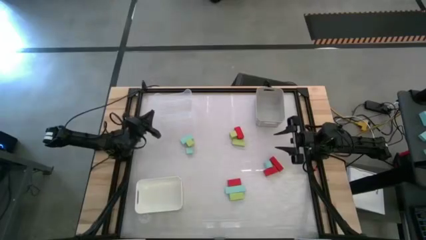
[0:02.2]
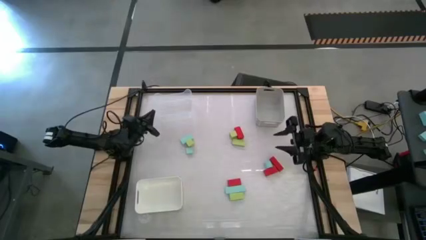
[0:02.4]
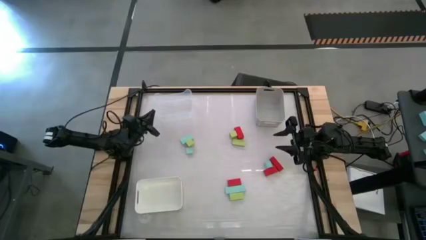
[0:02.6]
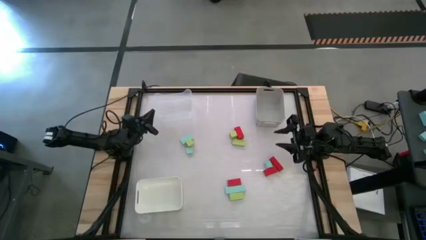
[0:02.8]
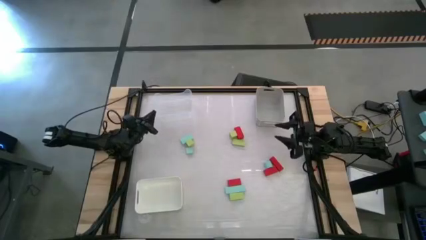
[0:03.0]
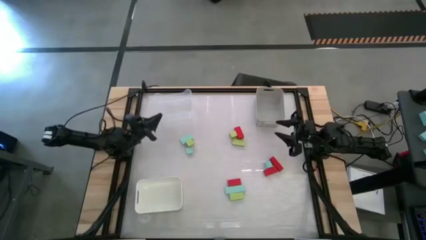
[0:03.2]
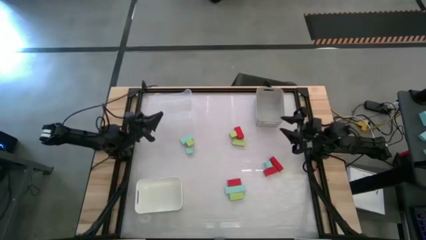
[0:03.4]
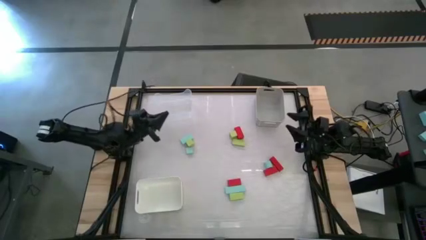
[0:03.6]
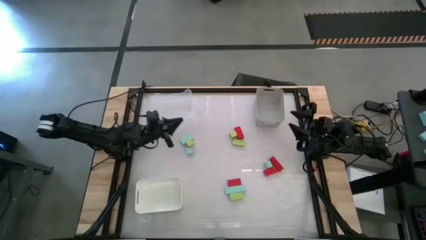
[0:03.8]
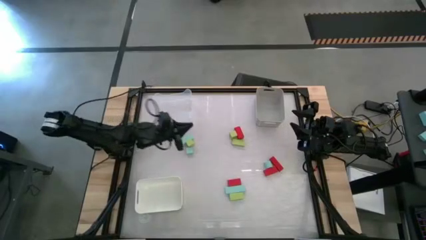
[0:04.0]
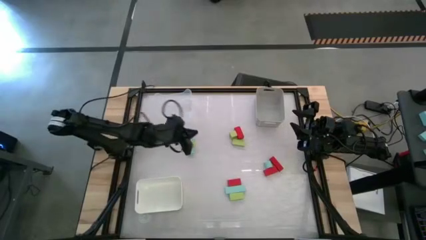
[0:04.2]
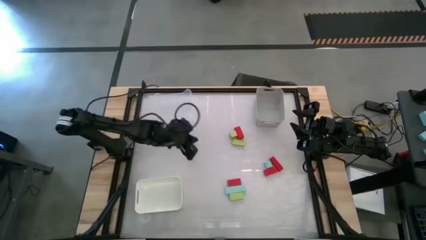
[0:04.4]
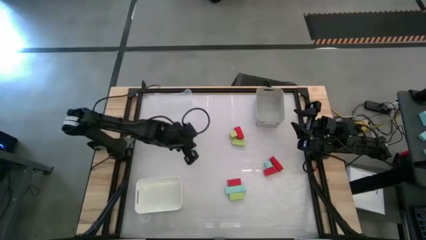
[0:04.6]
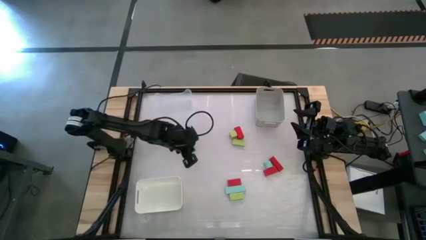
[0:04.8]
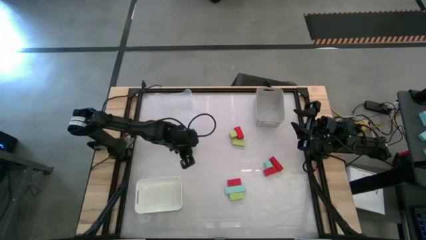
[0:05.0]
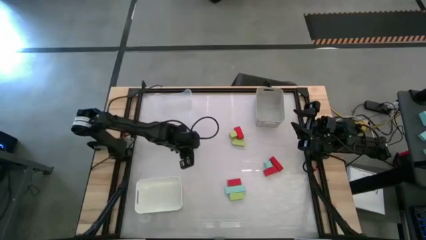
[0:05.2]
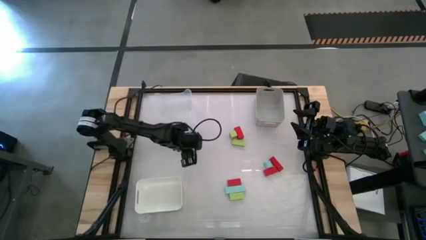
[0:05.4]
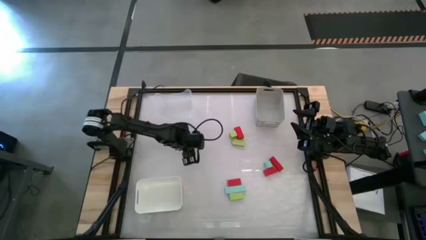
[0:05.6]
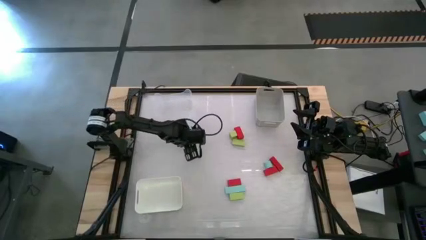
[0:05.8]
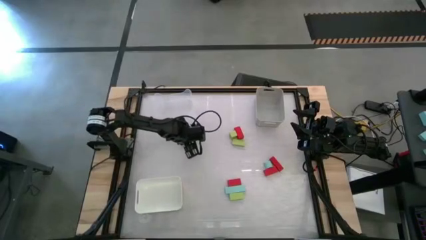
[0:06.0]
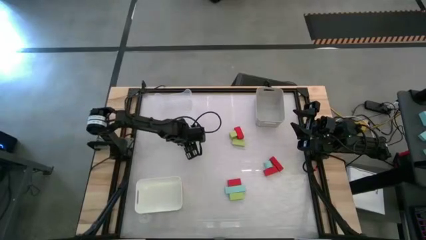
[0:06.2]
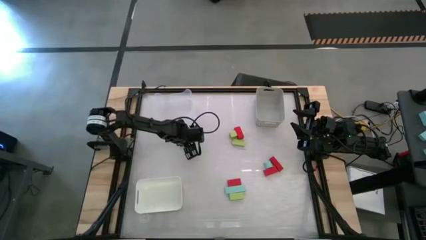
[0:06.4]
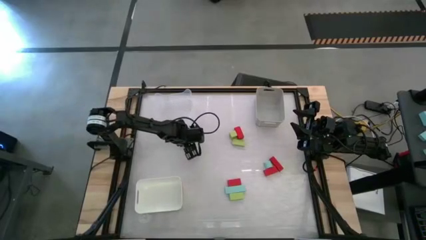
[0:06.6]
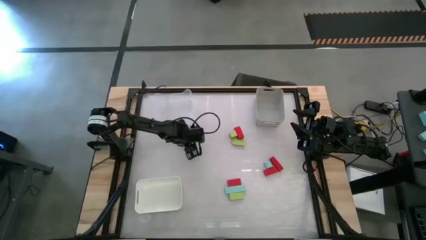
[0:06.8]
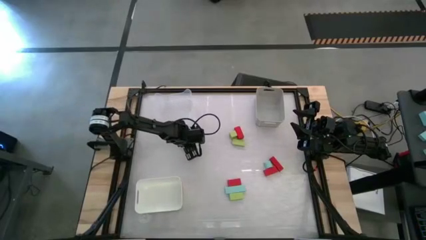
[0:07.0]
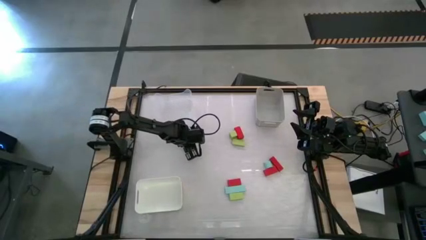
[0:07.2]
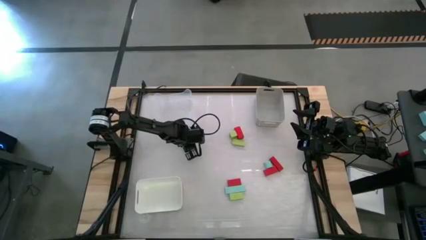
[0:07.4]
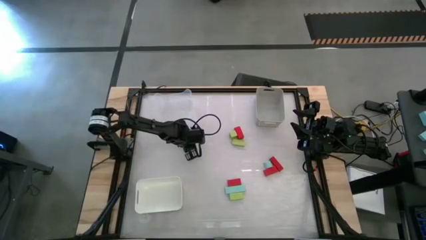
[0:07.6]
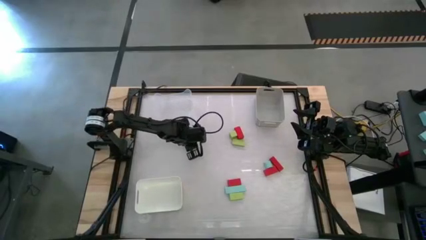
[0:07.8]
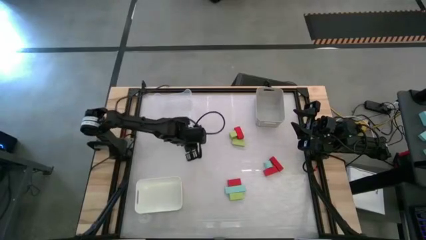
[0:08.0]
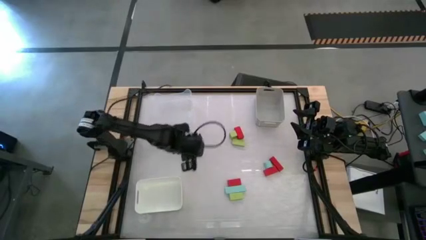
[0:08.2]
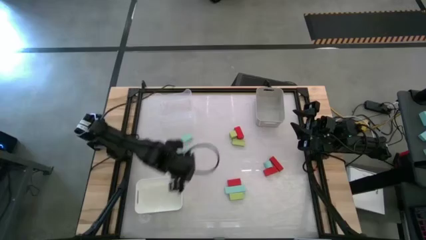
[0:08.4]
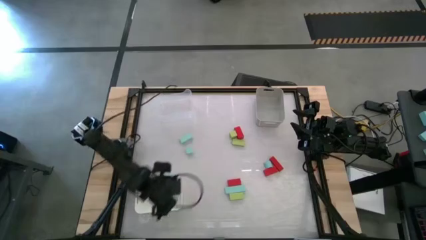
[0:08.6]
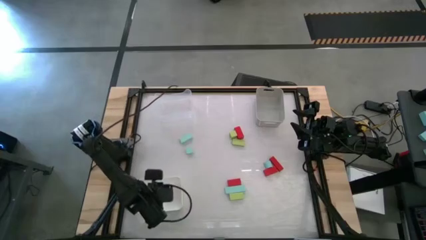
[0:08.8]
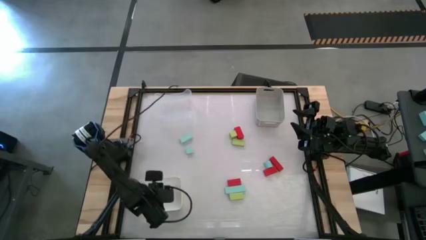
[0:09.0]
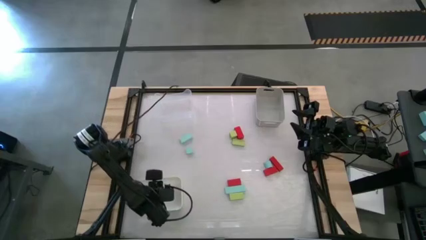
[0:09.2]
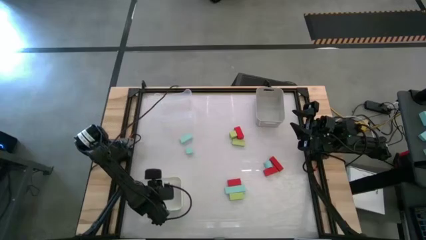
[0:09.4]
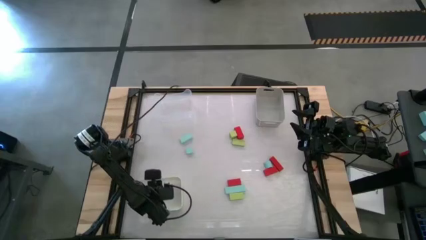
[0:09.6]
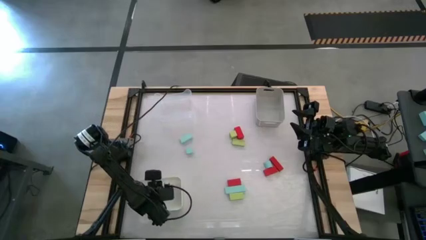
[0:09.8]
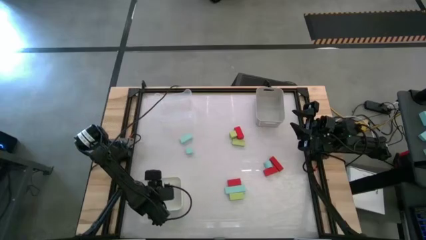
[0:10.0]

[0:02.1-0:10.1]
Task: Sort & place blocks by color
Put the top left green block into the white bin

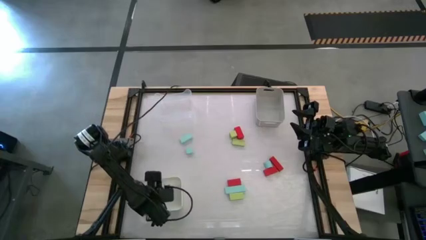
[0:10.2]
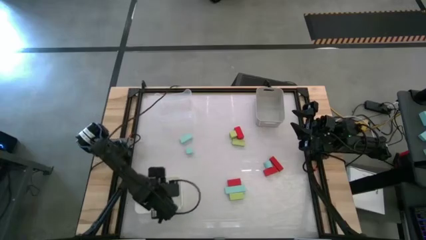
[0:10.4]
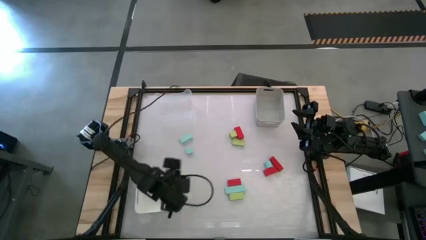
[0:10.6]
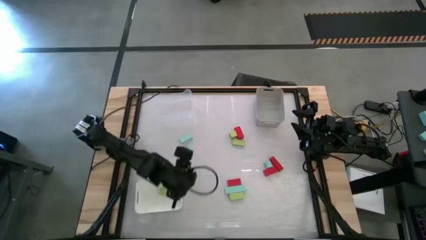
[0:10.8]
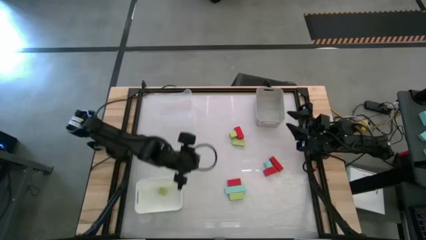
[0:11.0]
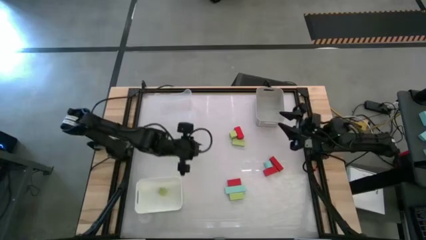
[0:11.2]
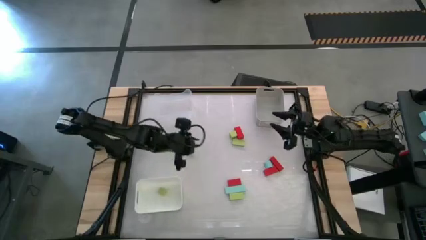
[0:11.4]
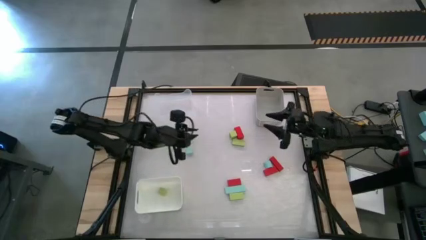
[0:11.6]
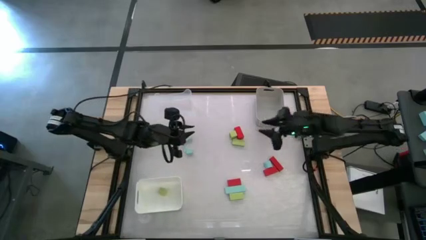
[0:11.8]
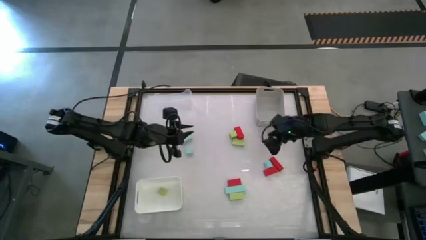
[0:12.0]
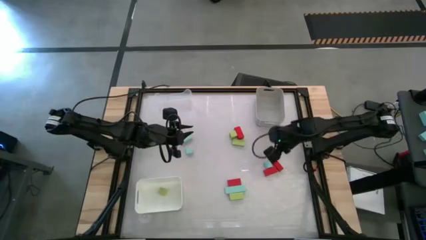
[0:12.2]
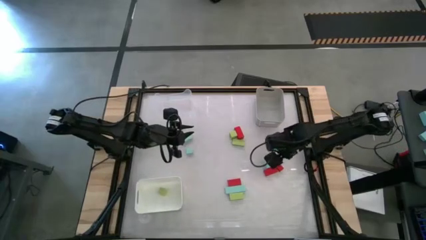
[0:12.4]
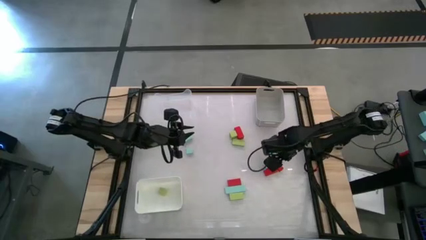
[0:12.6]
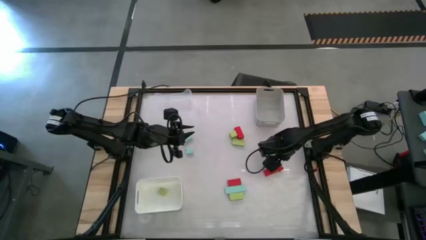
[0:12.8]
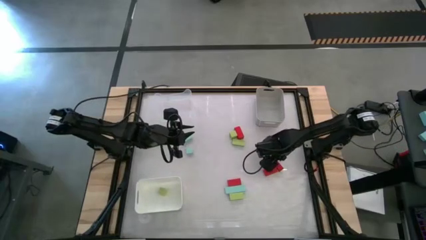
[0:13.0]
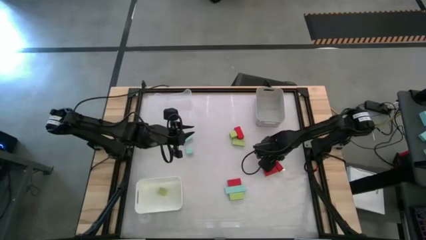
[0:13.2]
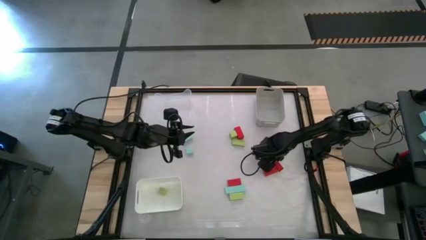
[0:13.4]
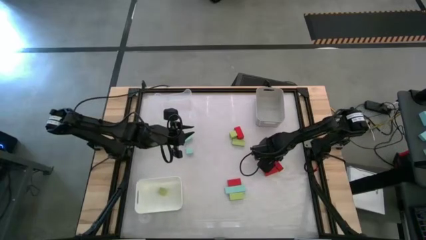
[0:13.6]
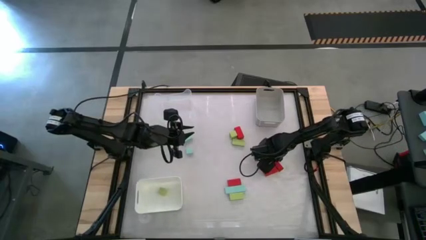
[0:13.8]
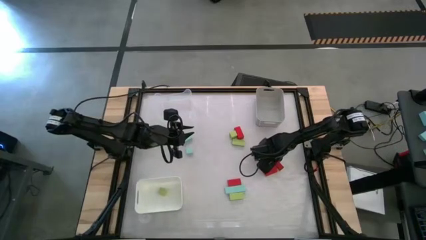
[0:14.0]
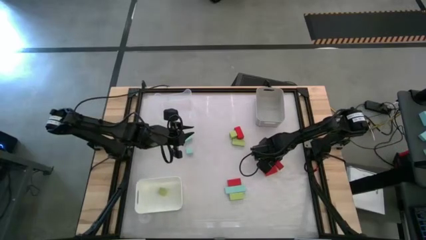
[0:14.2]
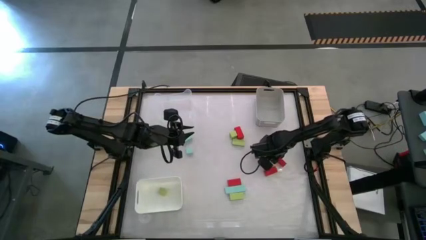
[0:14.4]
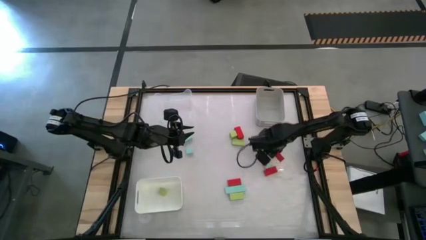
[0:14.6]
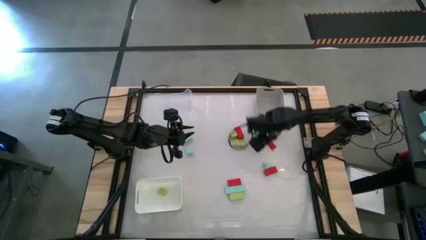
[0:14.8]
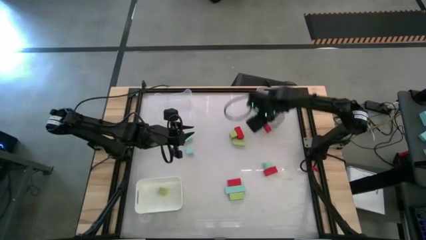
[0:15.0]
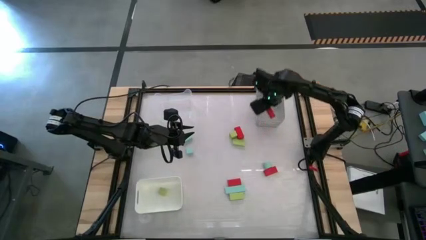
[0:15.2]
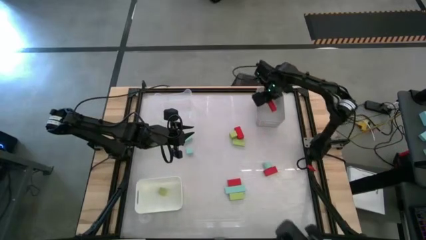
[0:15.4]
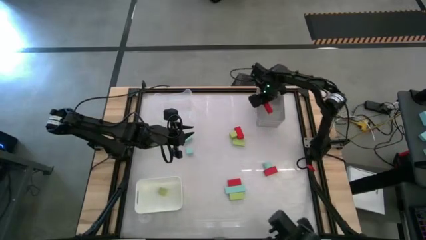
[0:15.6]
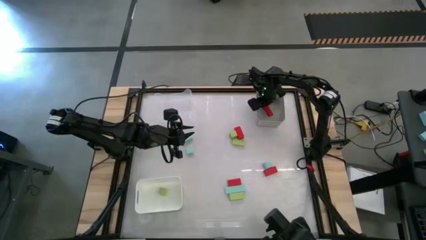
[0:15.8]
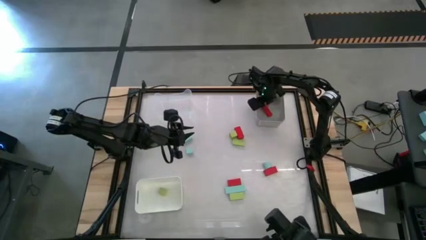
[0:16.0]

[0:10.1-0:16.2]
Put the top right red block into the gray bin

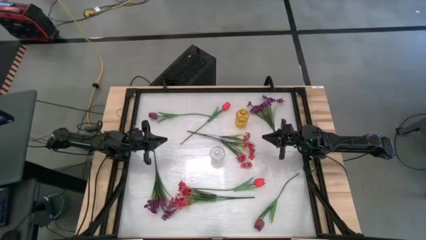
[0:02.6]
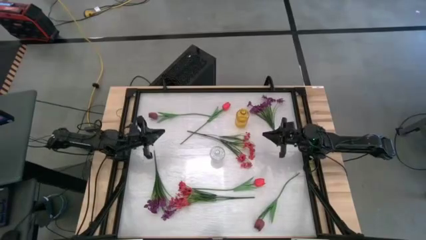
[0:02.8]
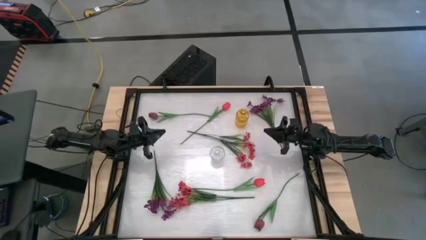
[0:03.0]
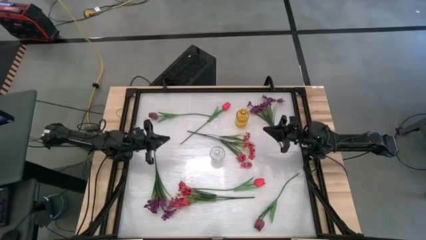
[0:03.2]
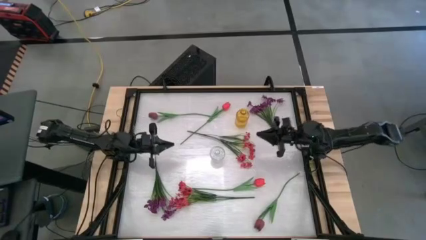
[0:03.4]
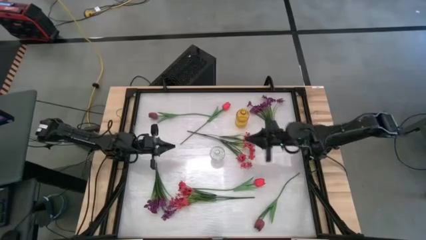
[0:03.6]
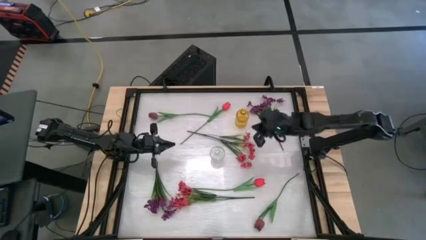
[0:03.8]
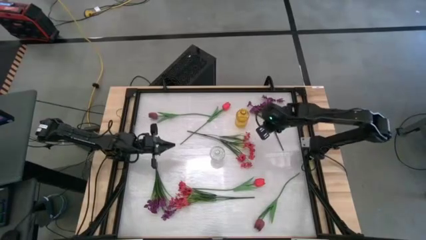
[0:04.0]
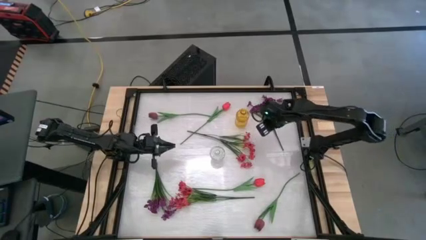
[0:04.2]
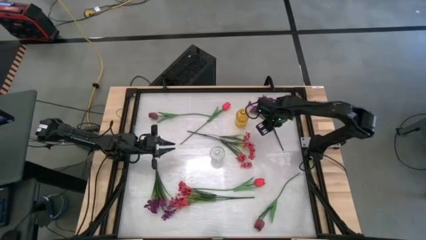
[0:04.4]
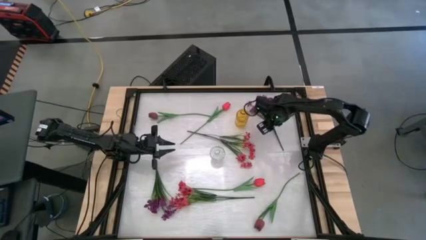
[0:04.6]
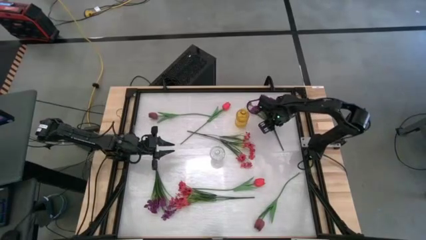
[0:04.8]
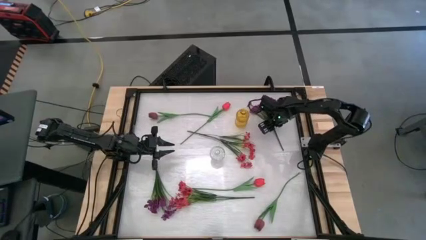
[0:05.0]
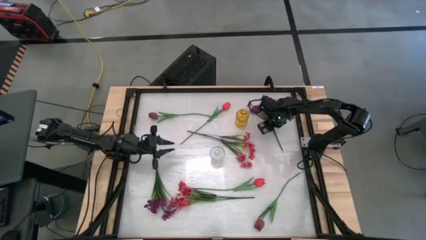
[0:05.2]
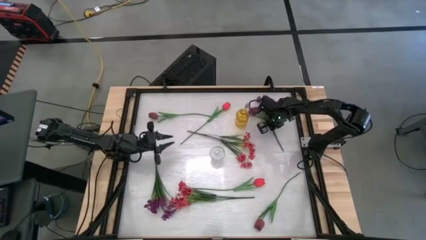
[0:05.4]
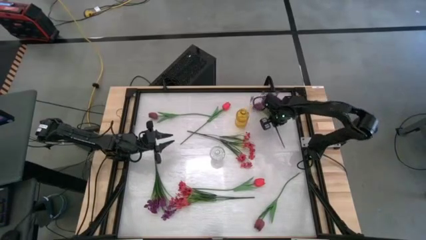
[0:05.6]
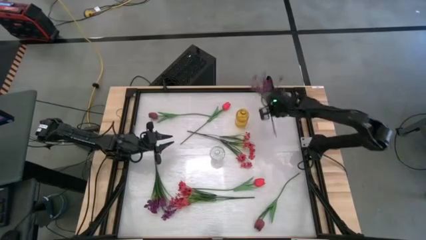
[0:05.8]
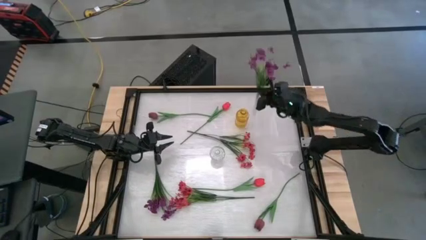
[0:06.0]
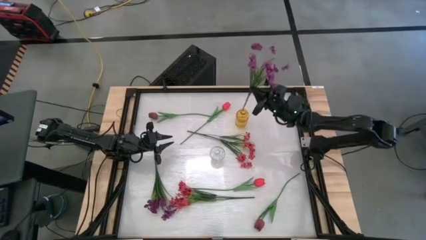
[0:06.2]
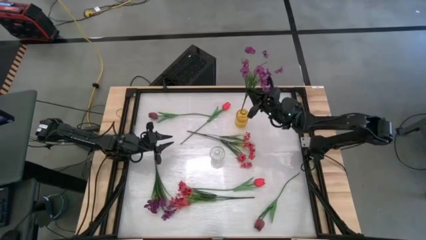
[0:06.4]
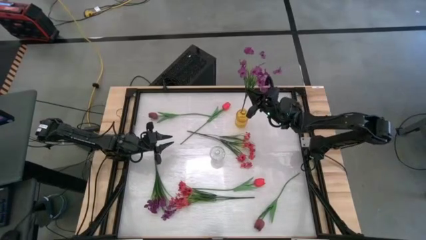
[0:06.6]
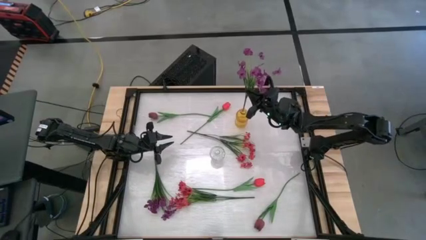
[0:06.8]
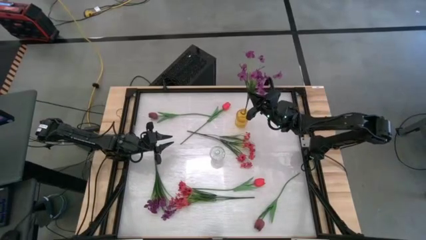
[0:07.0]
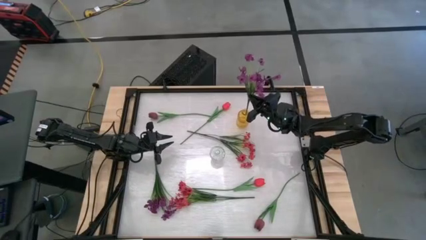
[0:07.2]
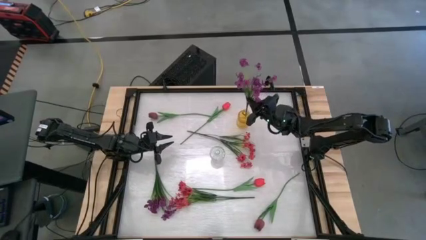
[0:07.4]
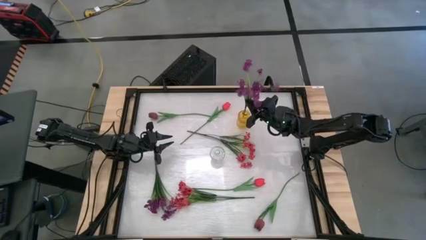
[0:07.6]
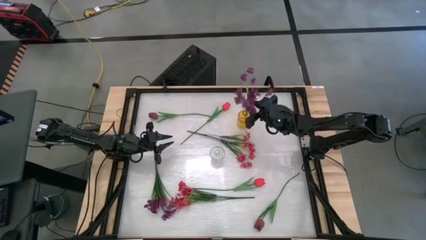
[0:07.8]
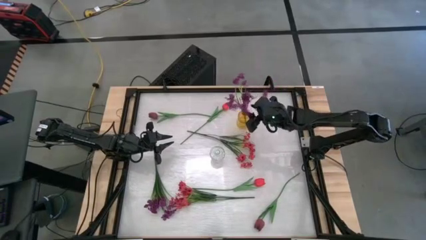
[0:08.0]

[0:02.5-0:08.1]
Task: Sort flowers into vase by color
Put the top right purple flower into the yellow vase
